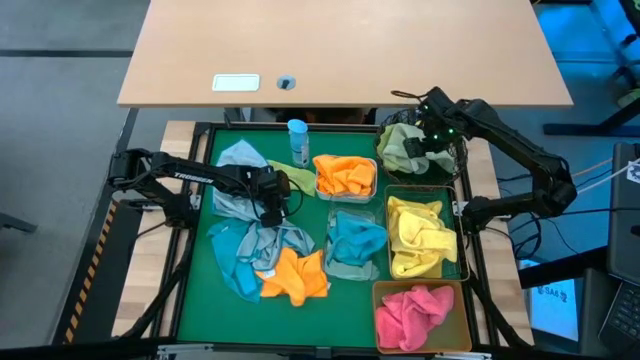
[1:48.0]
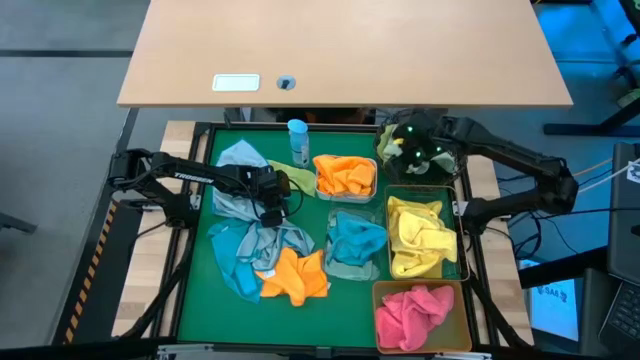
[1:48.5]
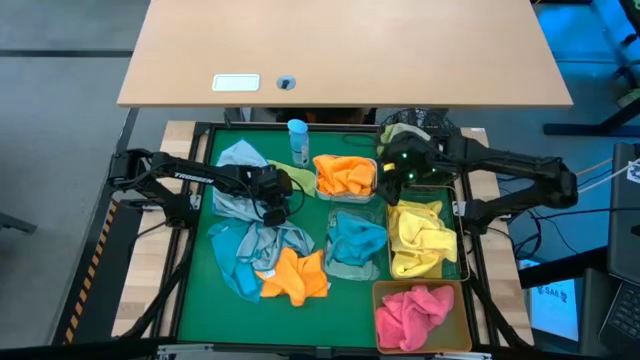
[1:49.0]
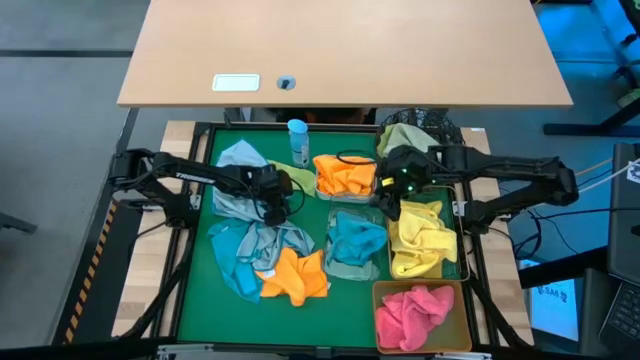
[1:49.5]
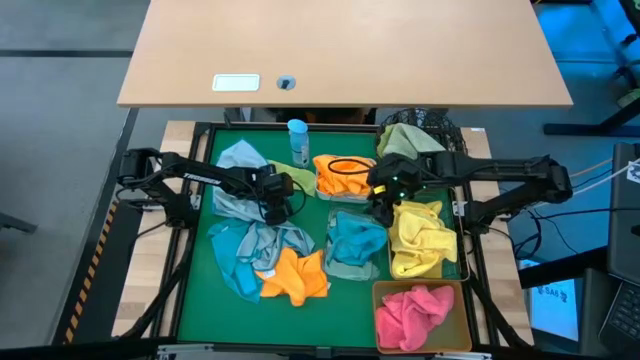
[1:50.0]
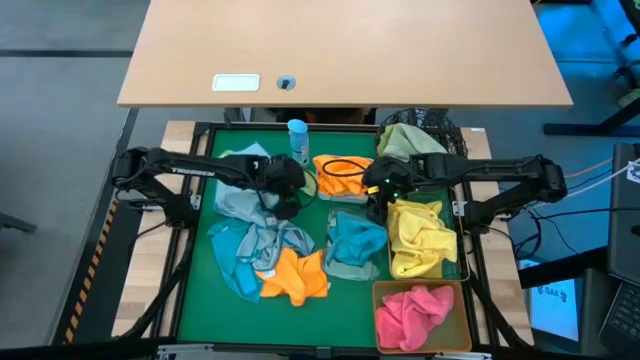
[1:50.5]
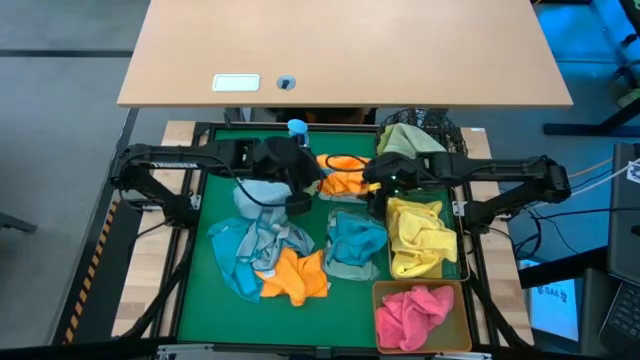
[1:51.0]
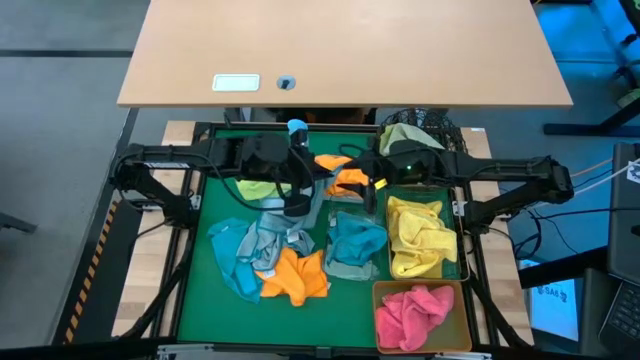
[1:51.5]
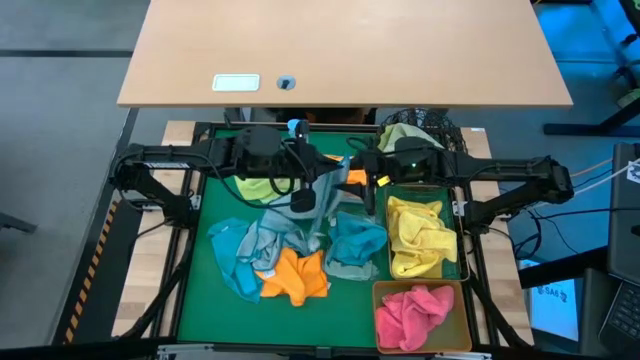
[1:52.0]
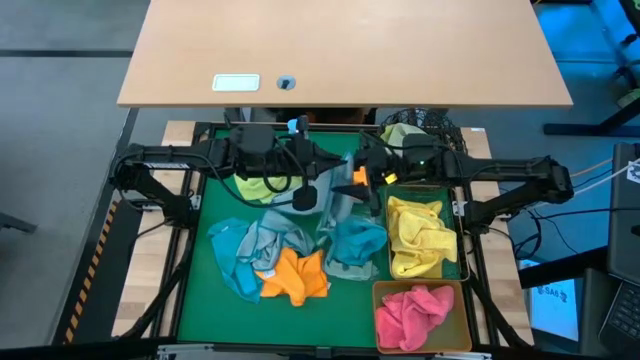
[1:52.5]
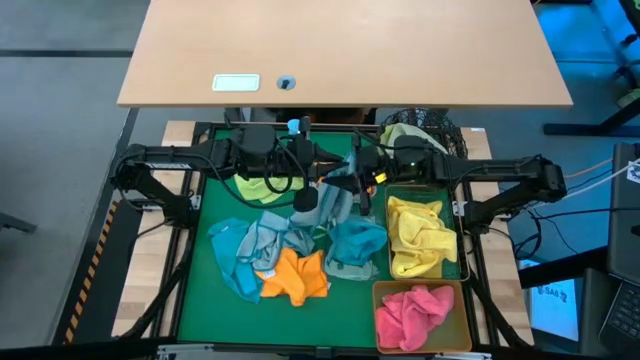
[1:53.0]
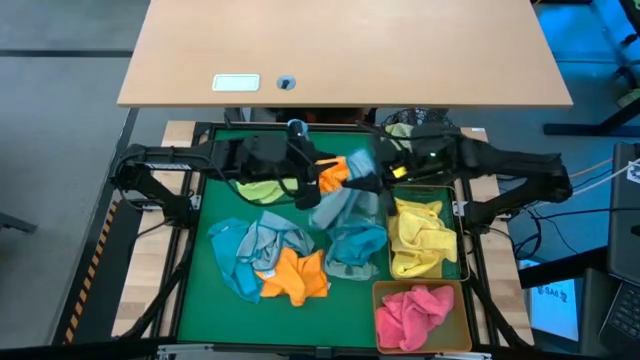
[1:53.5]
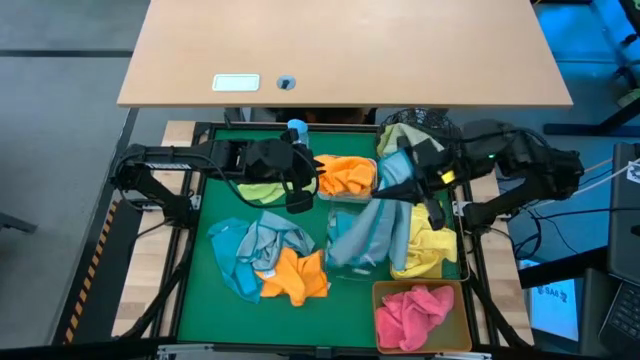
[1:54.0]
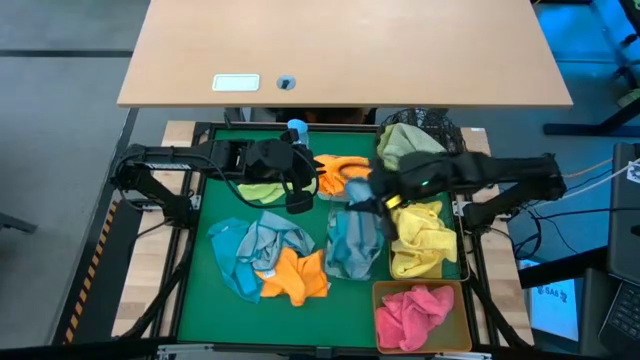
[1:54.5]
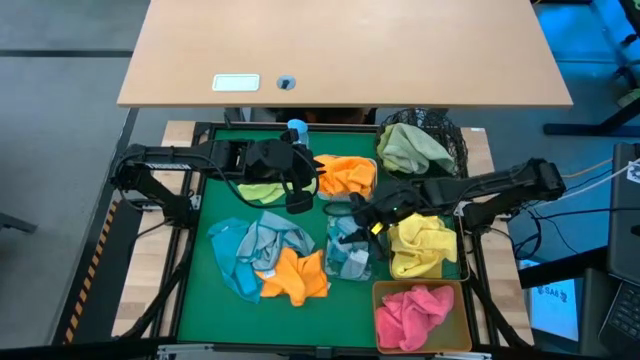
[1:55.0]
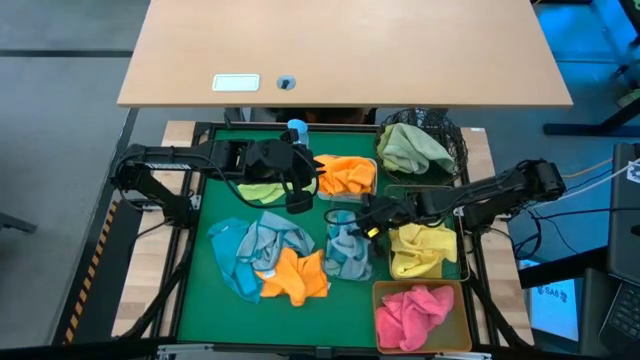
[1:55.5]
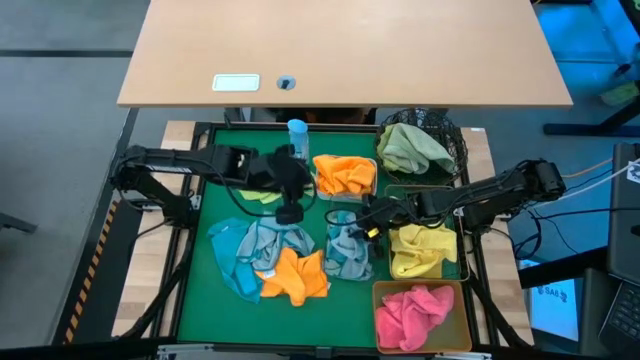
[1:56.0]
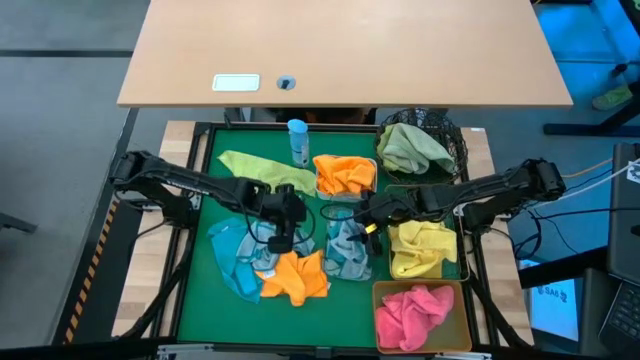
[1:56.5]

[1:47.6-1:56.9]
Task: Sort microfiber towel by color & place in baskets
Put the blue towel into the transparent bin

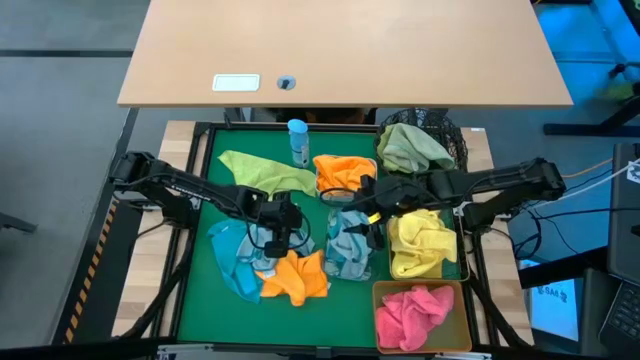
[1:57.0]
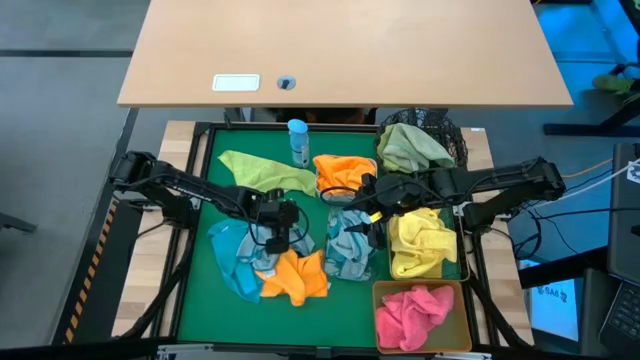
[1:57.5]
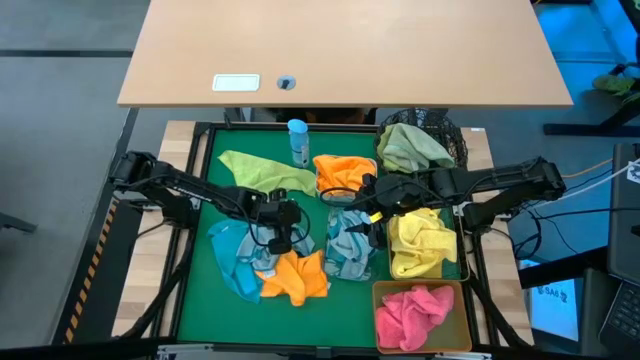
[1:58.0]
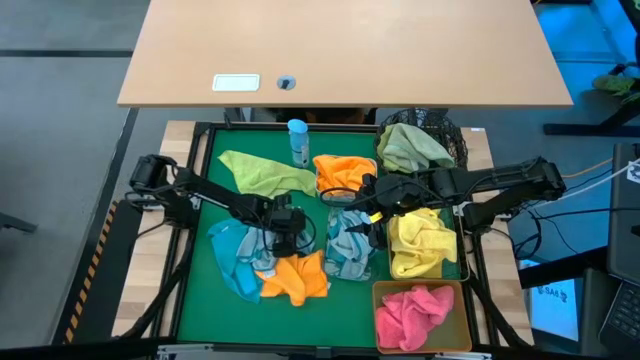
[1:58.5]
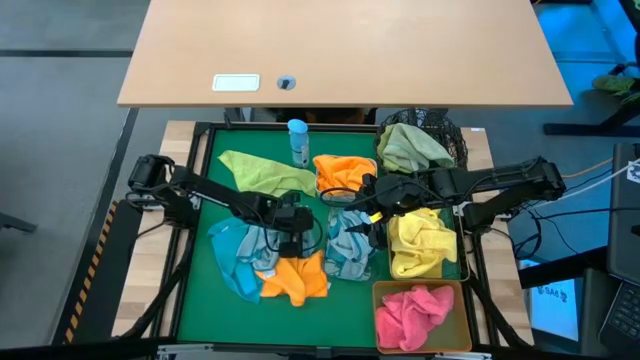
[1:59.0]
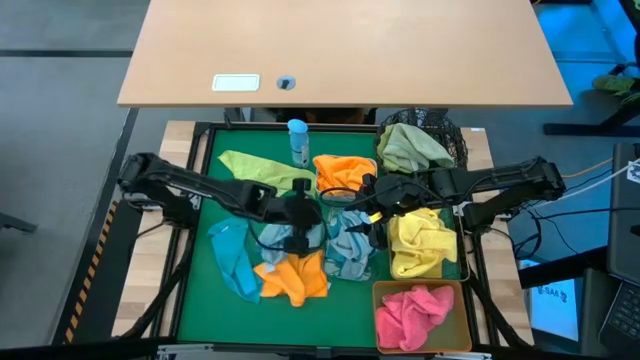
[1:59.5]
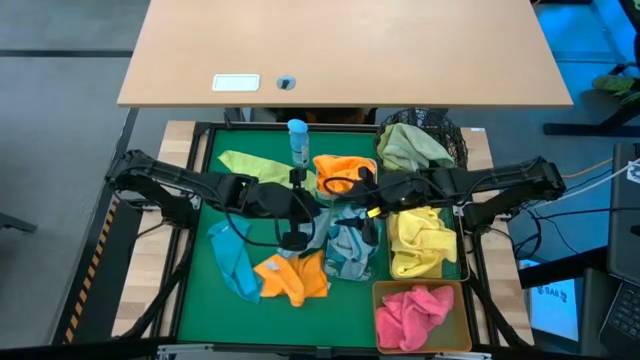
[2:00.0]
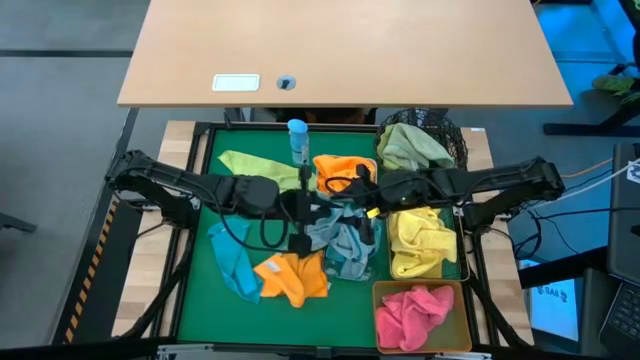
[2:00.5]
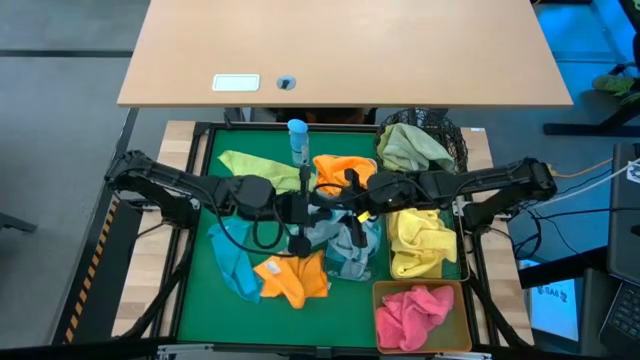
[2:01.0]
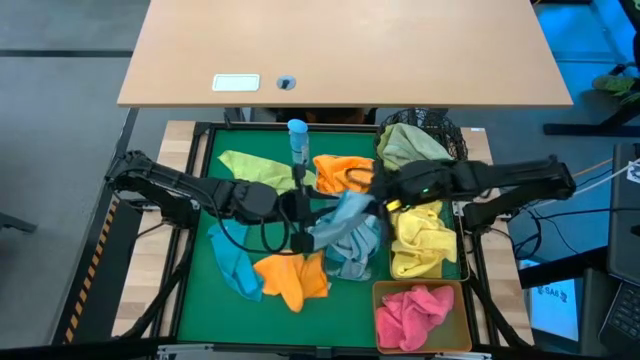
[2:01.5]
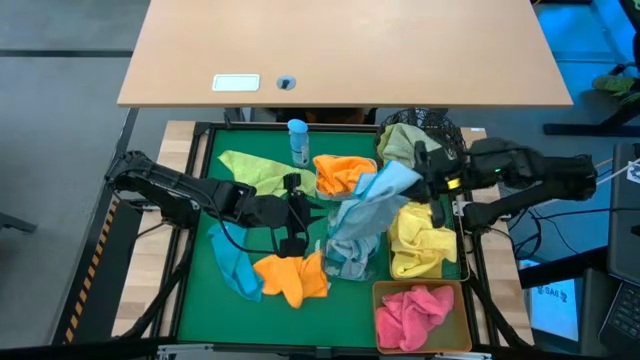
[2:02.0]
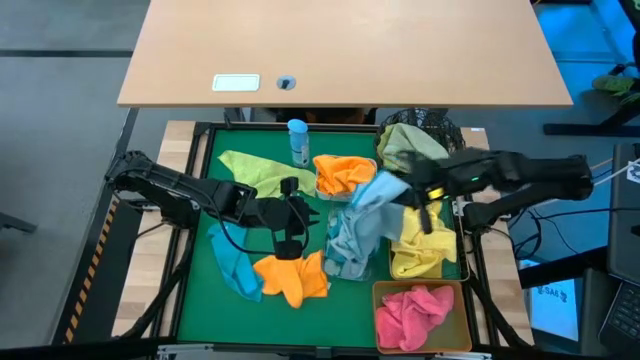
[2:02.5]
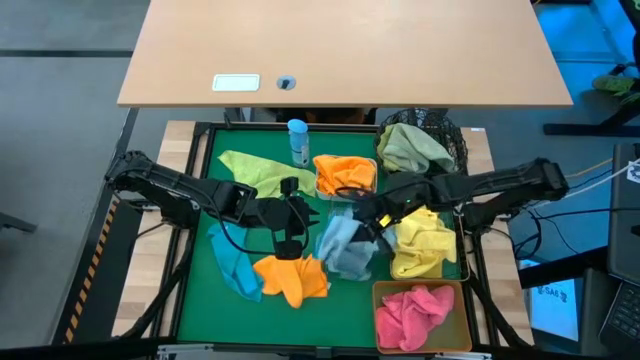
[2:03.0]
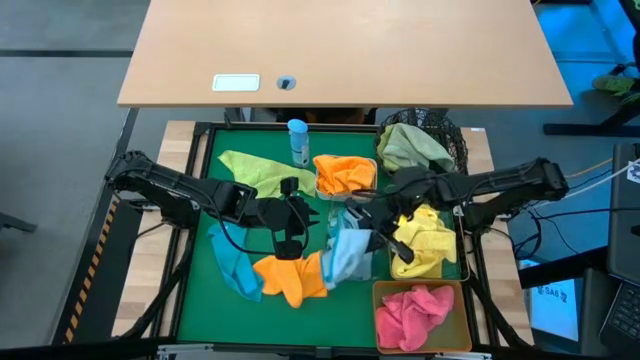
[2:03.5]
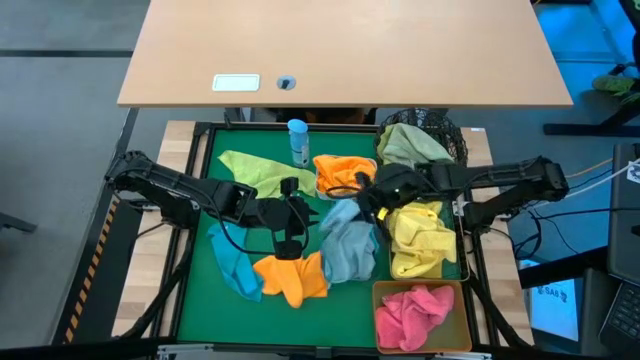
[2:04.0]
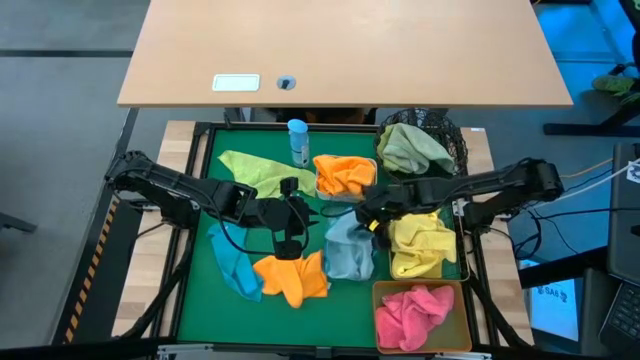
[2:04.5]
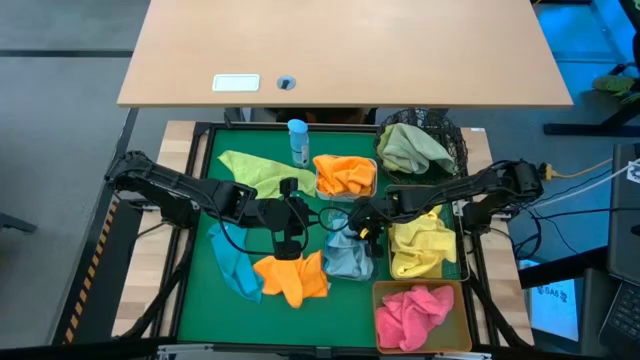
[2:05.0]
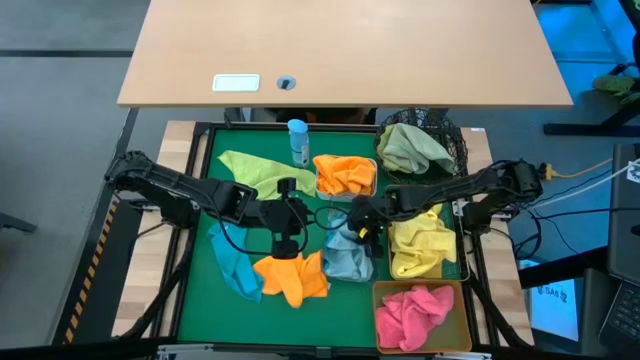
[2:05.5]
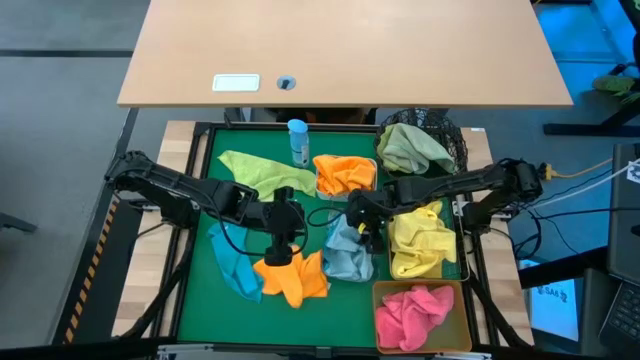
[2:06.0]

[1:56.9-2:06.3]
Put the blue towel into the transparent bin
